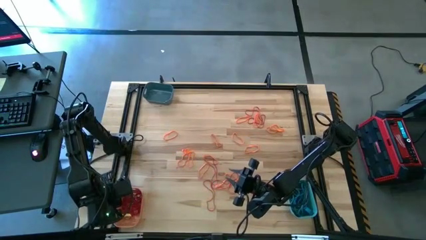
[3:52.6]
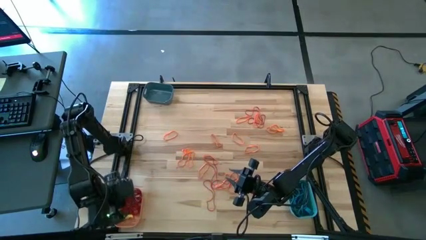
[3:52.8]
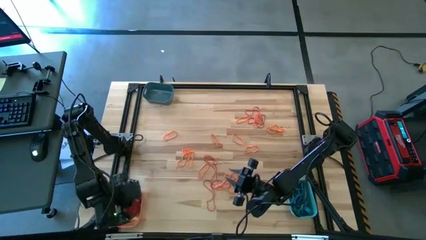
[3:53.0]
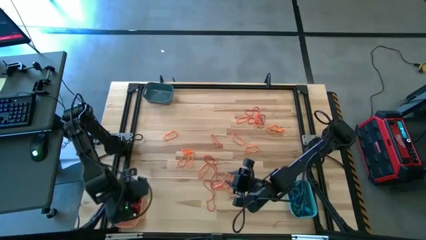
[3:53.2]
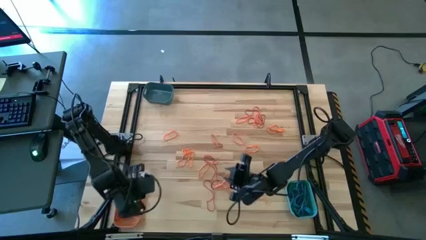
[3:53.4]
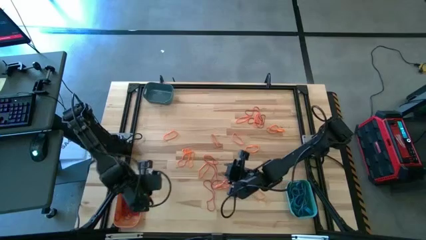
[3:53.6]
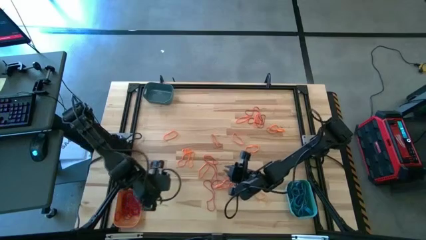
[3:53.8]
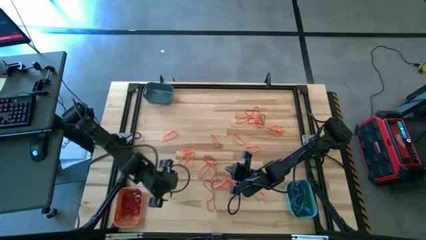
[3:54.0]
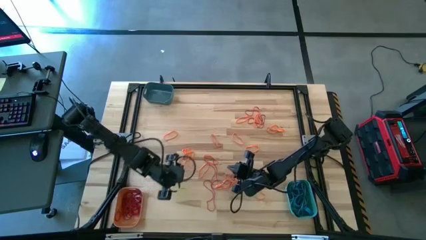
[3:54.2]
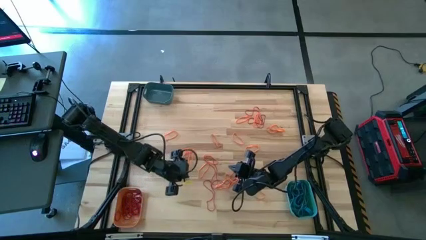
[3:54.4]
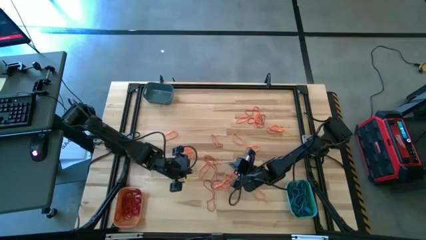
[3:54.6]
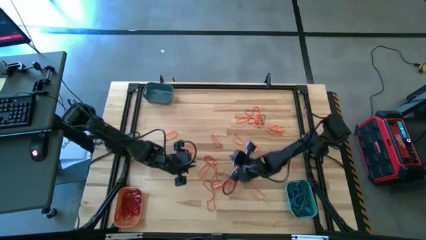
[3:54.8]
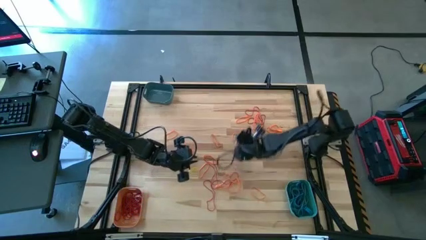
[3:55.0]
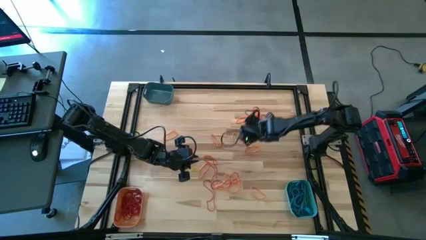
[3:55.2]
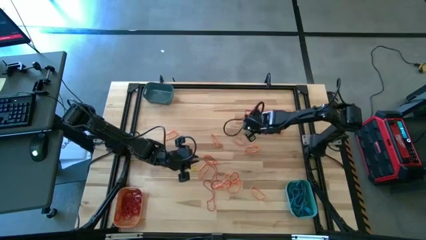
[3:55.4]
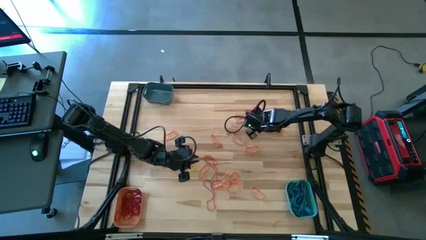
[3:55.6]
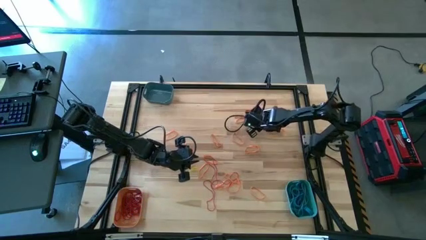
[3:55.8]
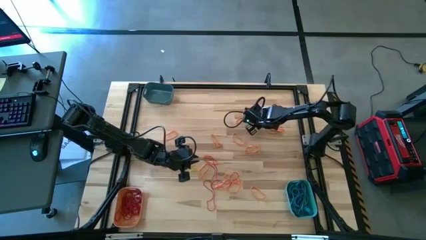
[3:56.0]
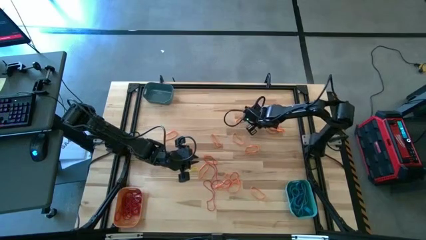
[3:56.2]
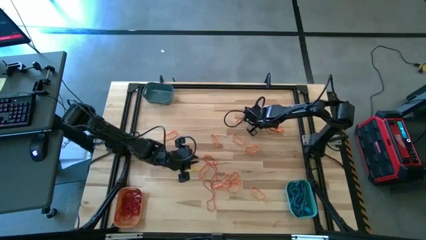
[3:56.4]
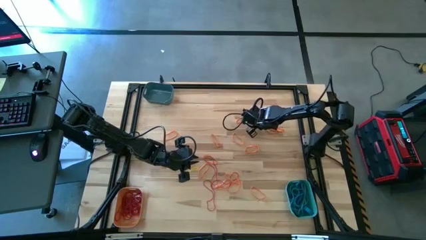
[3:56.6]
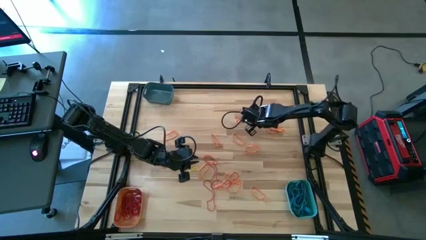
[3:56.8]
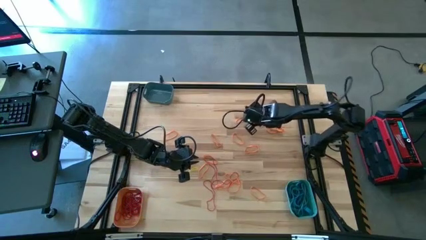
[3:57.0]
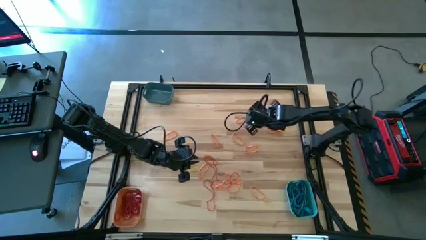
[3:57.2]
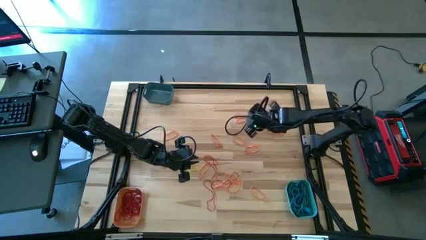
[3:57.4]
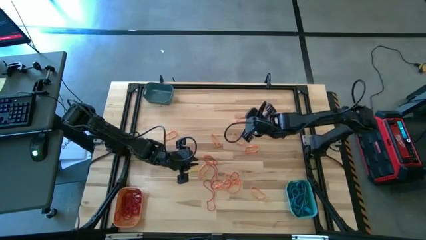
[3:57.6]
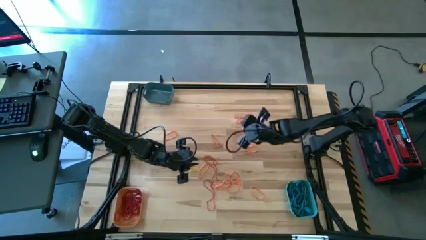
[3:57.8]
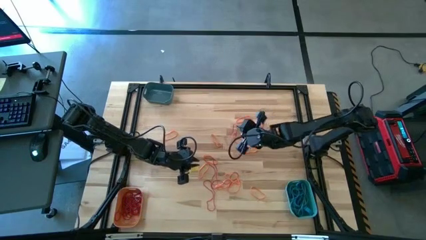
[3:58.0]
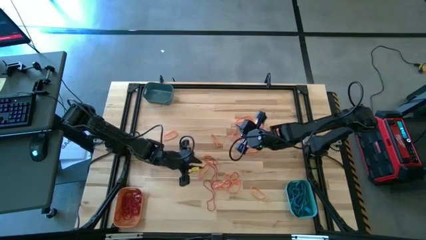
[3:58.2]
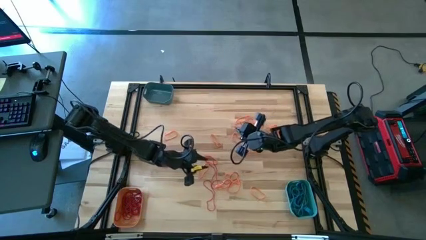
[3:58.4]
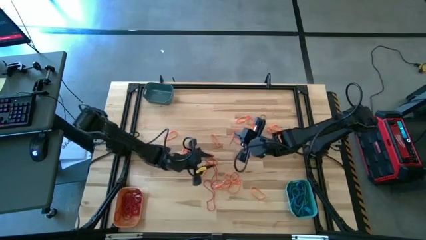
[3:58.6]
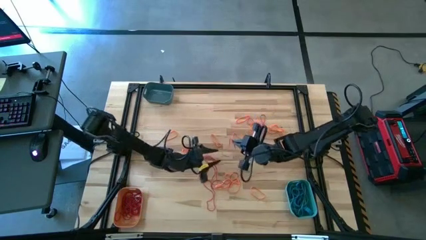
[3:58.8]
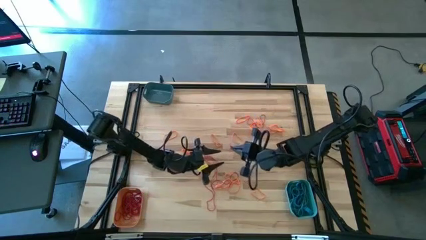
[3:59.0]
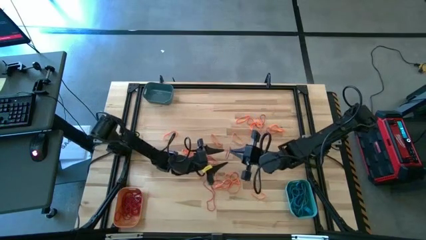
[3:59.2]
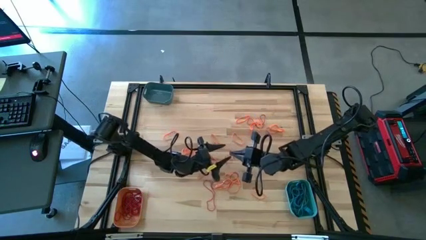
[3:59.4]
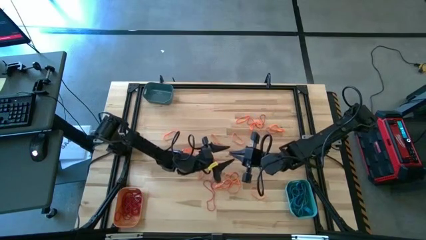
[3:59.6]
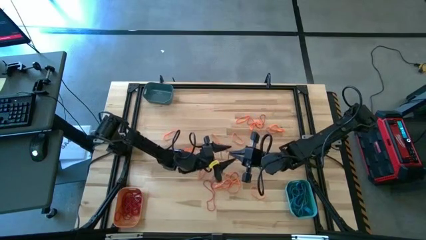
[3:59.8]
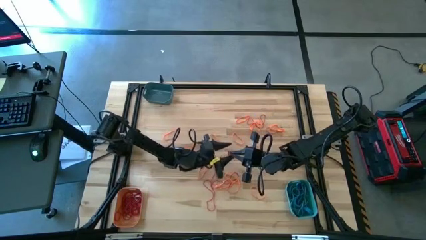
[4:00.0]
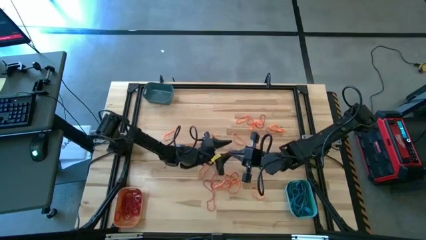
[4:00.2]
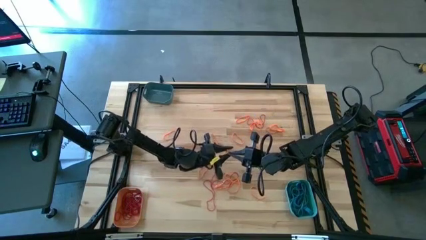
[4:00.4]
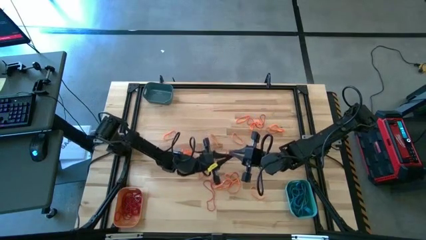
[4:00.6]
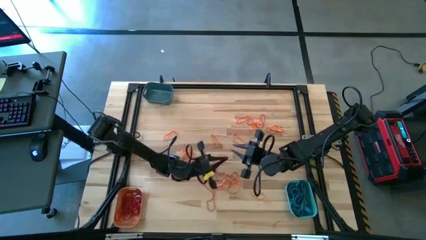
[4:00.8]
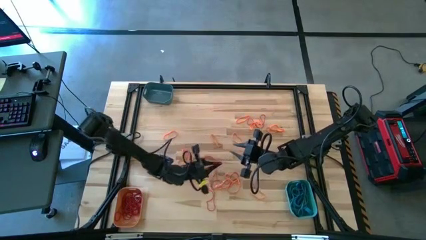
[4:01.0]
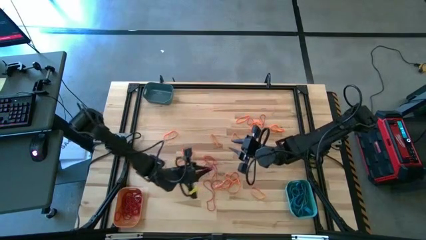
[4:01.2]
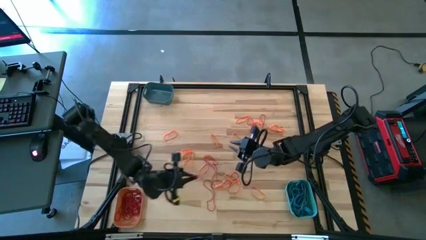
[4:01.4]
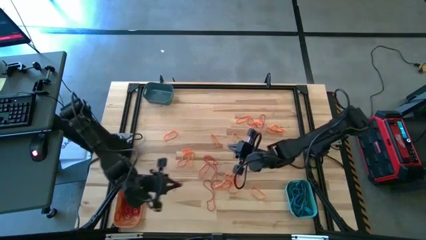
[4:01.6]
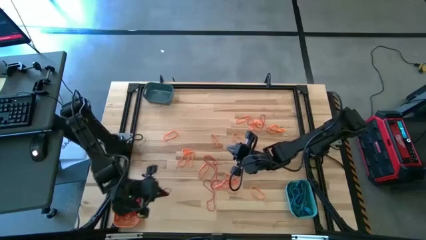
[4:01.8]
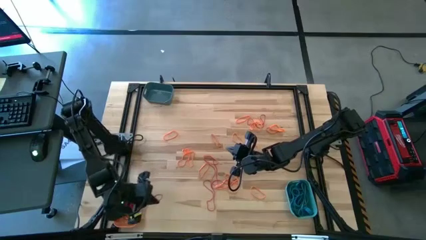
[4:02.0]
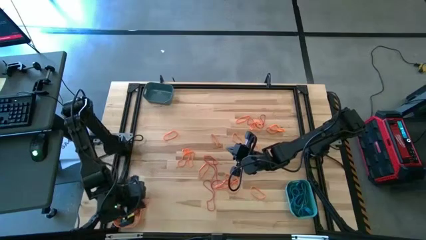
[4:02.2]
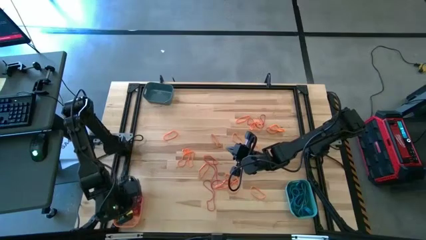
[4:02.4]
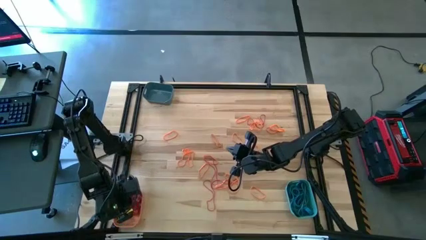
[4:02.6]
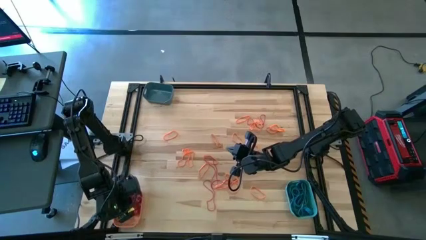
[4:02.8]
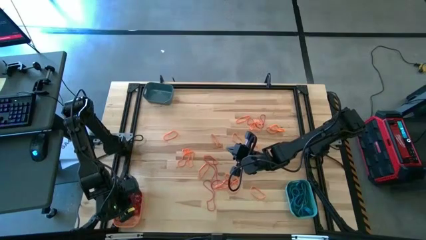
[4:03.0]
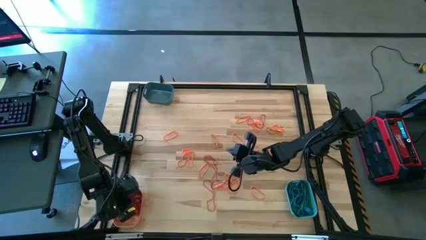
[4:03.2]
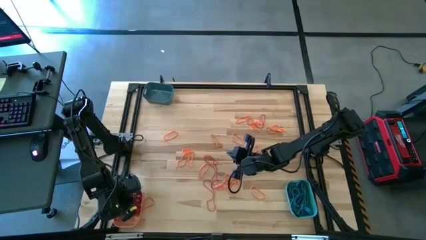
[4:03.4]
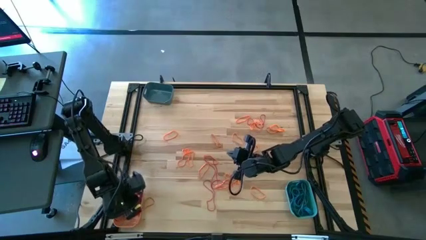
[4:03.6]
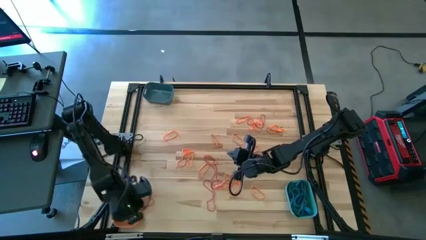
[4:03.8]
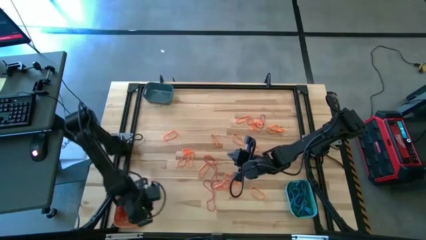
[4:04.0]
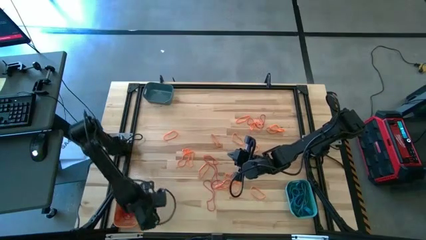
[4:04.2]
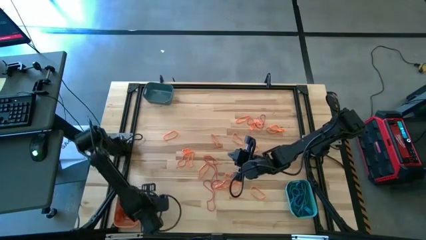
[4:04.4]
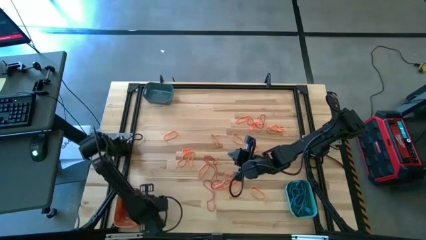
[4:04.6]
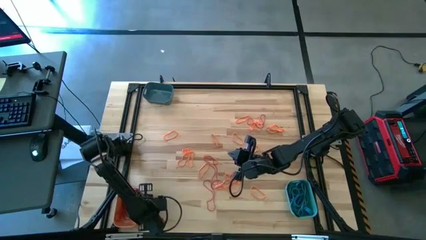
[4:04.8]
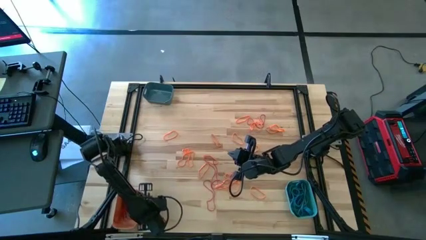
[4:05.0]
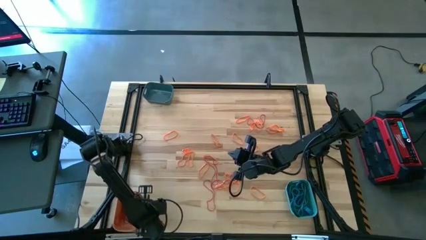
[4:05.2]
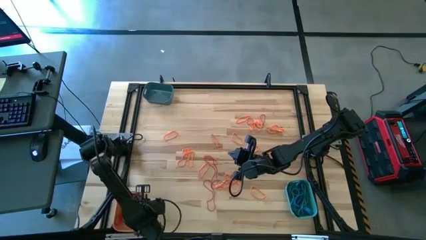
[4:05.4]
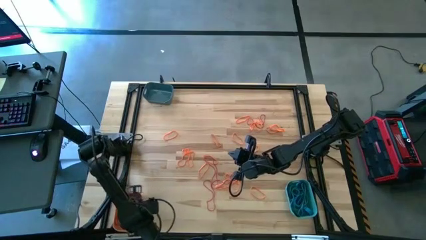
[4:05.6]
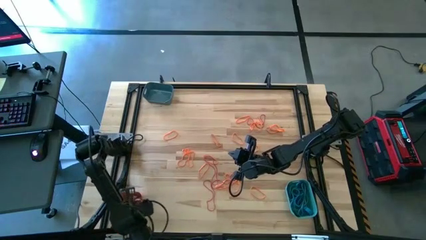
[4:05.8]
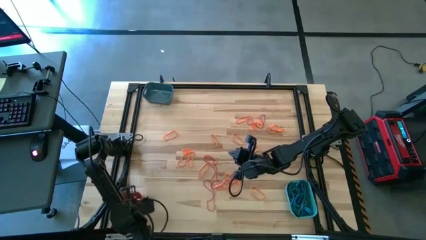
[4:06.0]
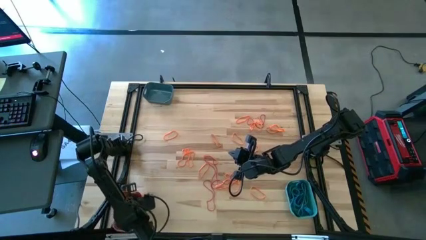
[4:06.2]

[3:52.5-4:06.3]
Task: Sort rubber bands into baskets
Put the red rubber band into the orange bin

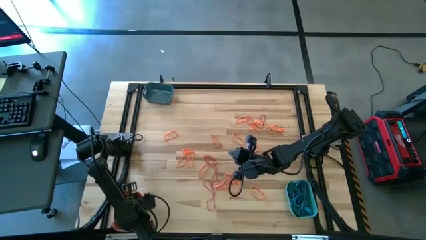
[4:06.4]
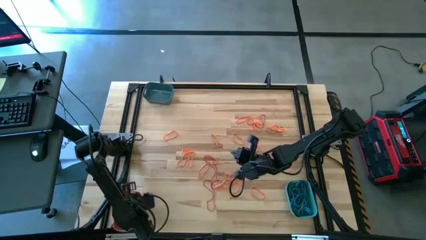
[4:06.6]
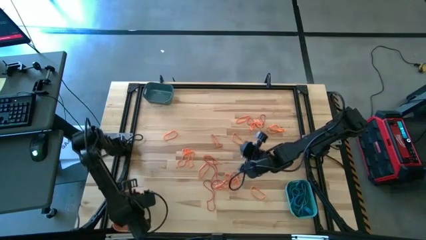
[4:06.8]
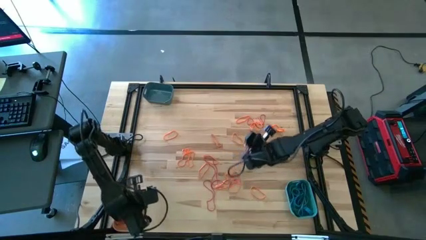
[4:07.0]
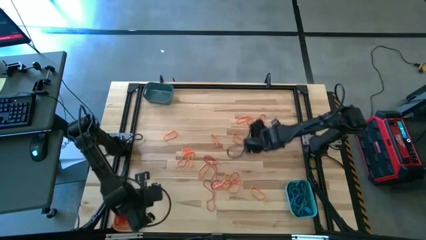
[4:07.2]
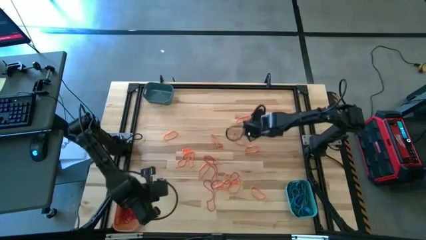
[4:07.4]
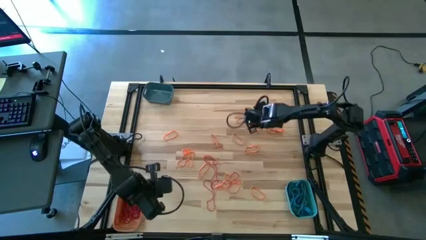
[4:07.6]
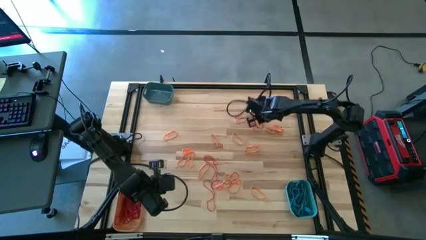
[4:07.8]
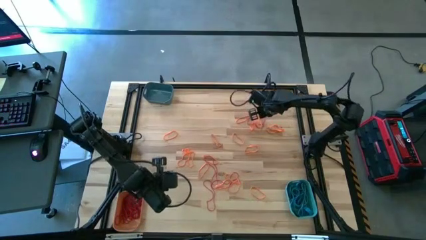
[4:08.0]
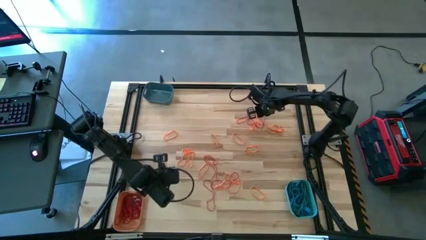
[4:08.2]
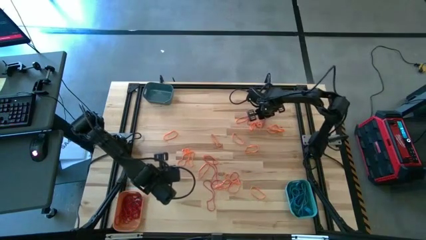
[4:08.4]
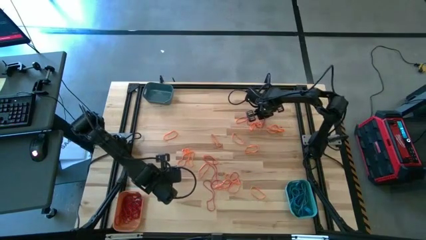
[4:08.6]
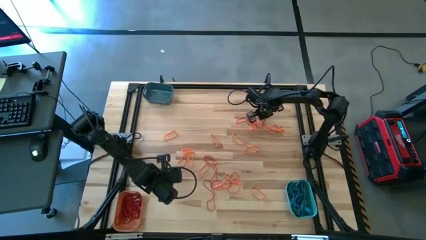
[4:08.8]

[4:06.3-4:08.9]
Put the red rubber band into the orange bin

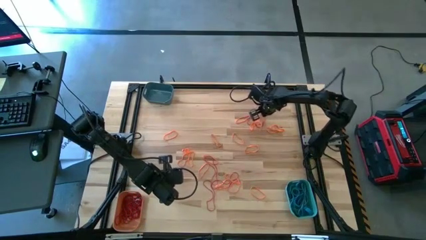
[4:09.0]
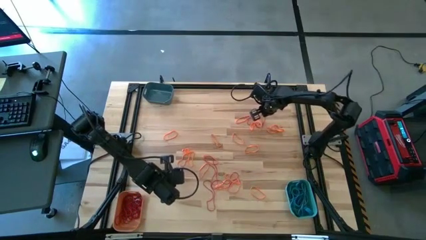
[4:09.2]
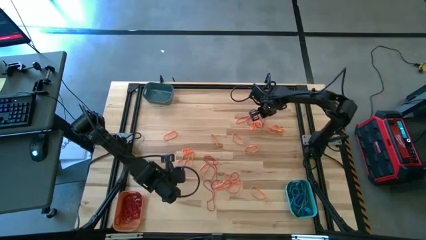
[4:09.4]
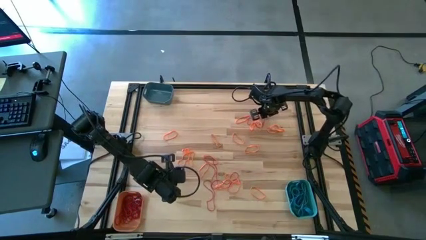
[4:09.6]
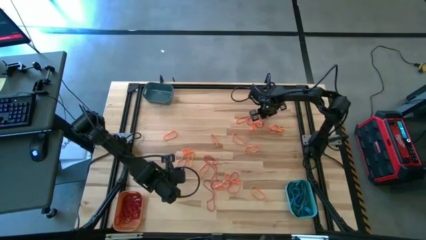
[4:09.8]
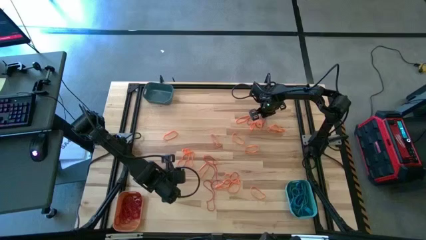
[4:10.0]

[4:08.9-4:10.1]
Put the red rubber band into the orange bin
